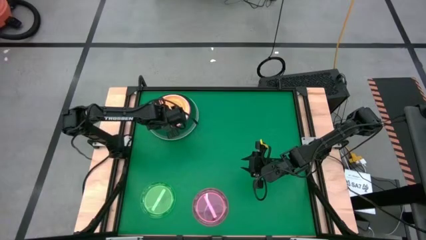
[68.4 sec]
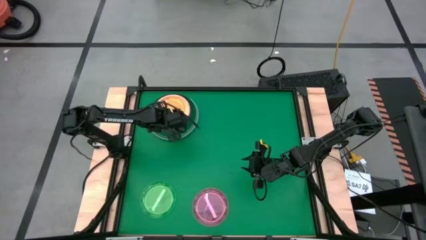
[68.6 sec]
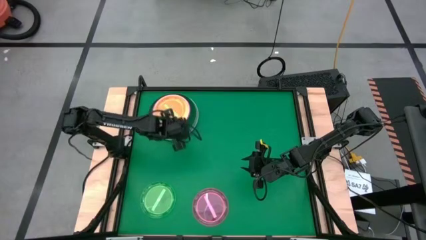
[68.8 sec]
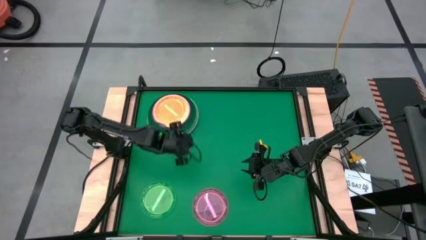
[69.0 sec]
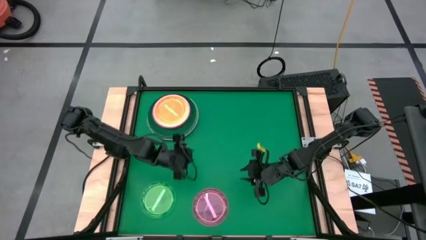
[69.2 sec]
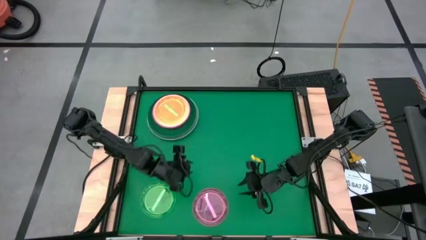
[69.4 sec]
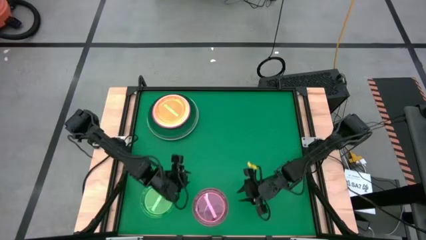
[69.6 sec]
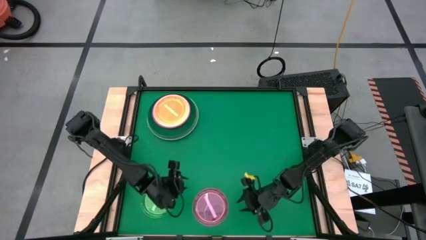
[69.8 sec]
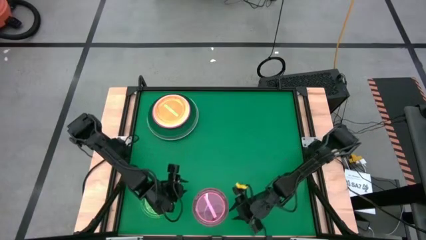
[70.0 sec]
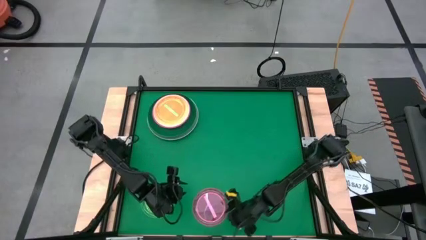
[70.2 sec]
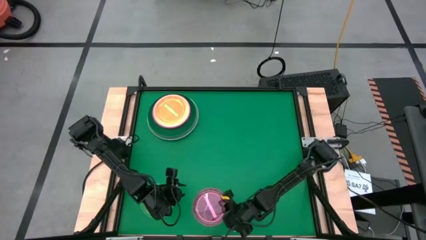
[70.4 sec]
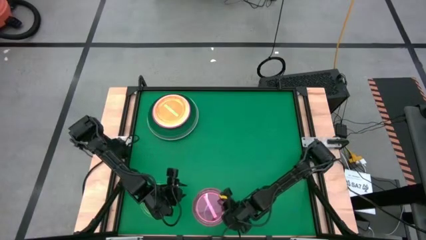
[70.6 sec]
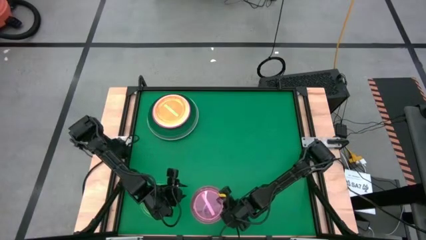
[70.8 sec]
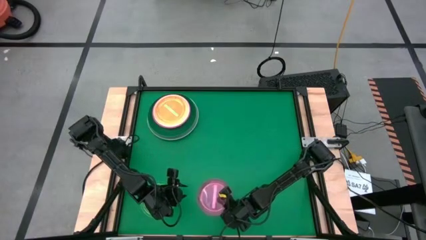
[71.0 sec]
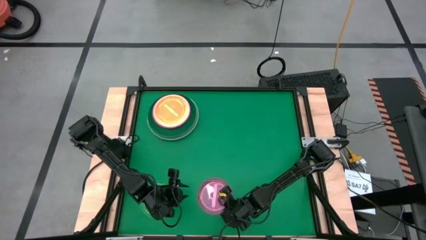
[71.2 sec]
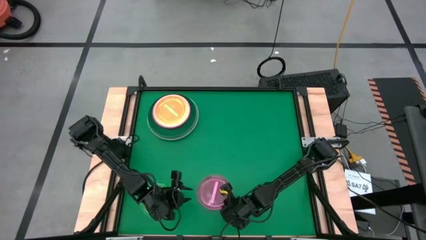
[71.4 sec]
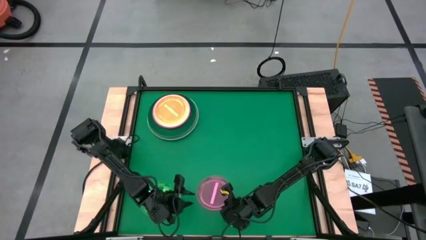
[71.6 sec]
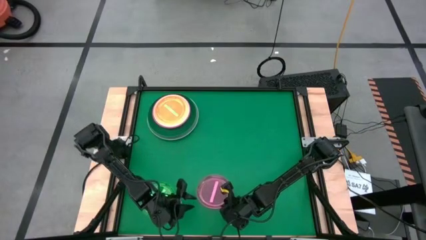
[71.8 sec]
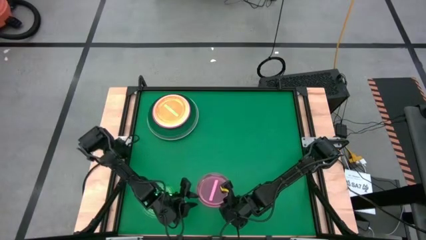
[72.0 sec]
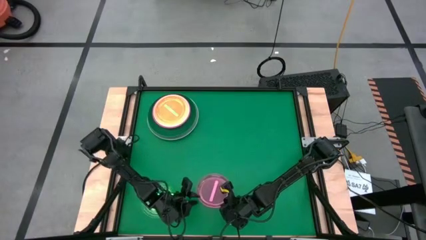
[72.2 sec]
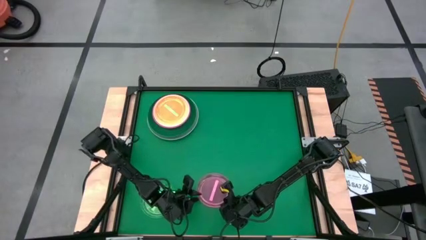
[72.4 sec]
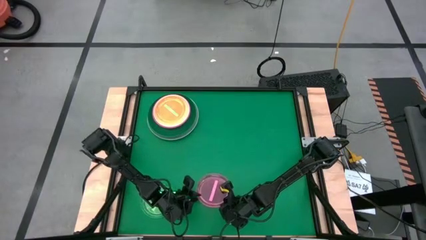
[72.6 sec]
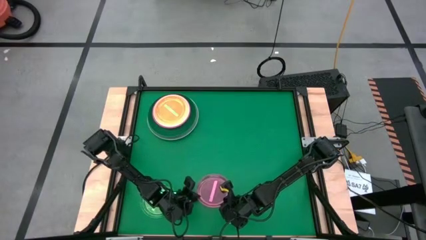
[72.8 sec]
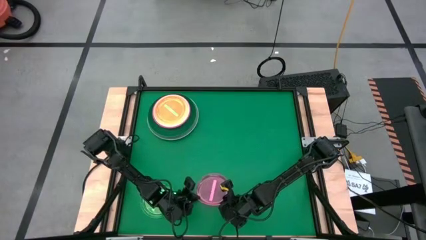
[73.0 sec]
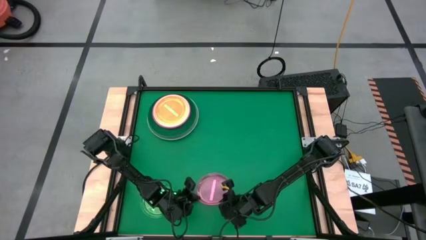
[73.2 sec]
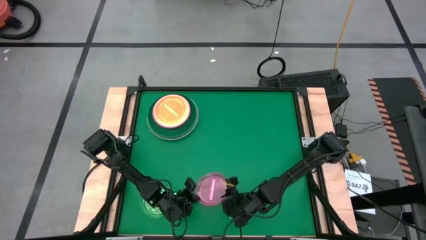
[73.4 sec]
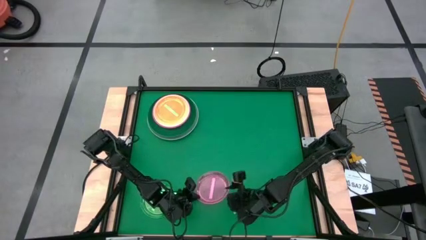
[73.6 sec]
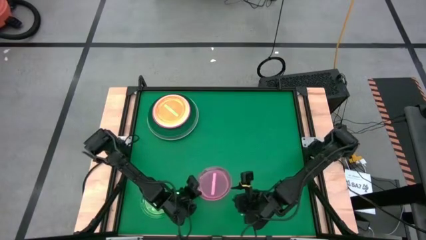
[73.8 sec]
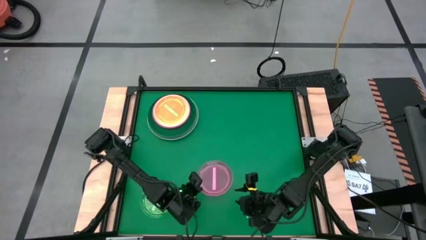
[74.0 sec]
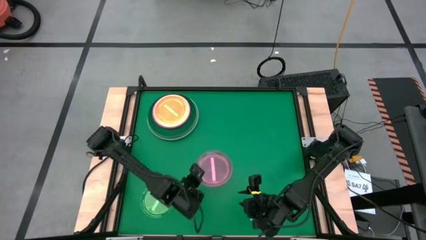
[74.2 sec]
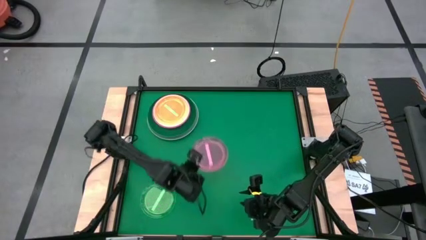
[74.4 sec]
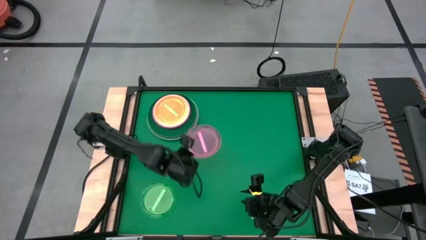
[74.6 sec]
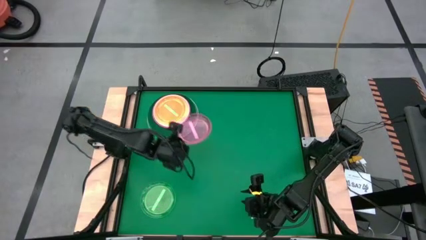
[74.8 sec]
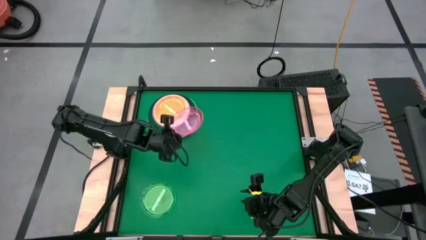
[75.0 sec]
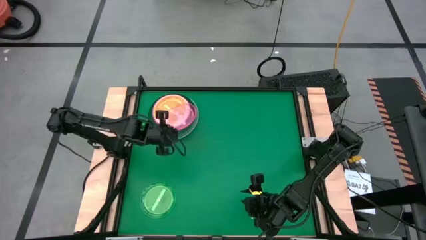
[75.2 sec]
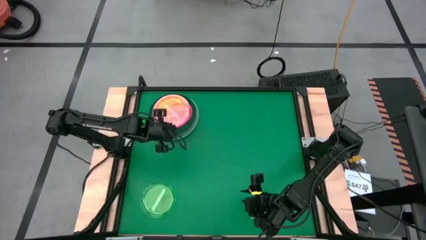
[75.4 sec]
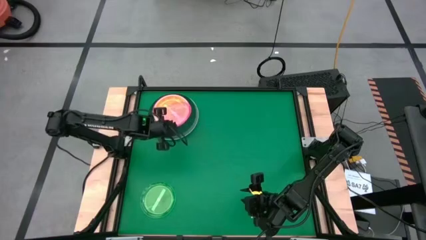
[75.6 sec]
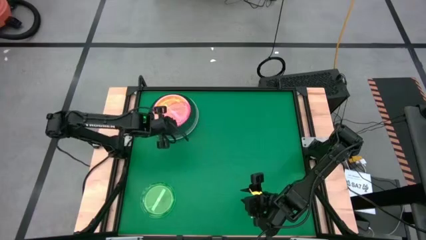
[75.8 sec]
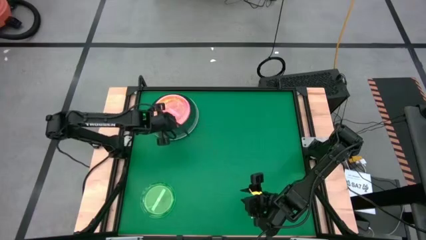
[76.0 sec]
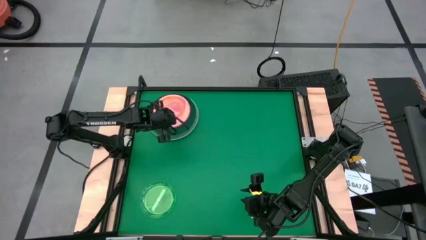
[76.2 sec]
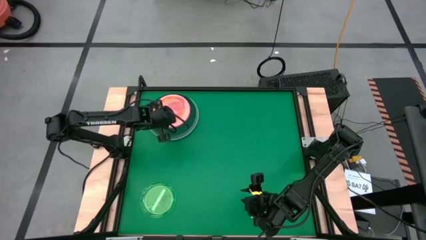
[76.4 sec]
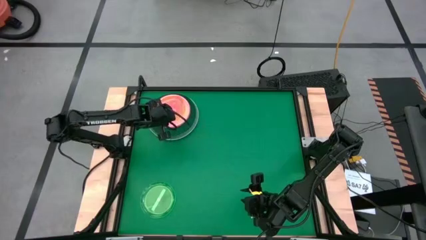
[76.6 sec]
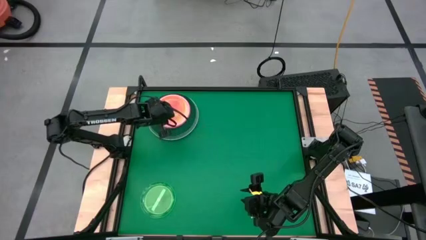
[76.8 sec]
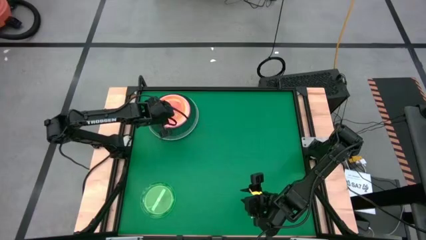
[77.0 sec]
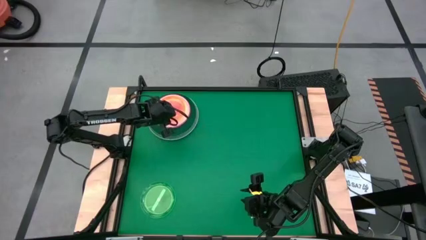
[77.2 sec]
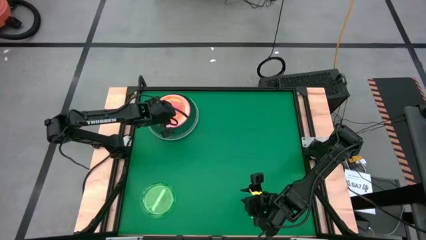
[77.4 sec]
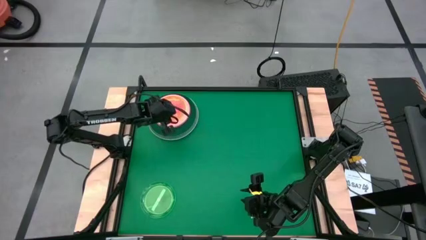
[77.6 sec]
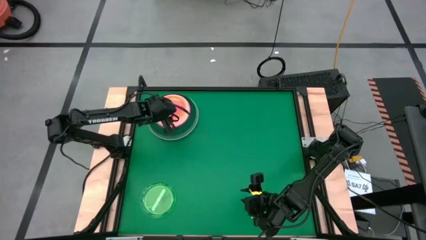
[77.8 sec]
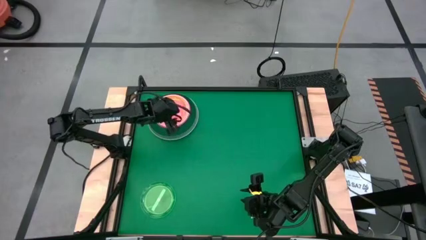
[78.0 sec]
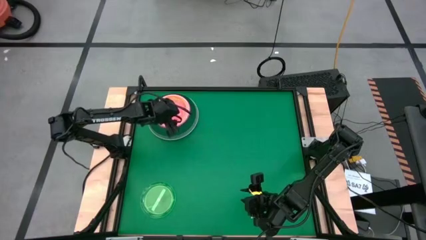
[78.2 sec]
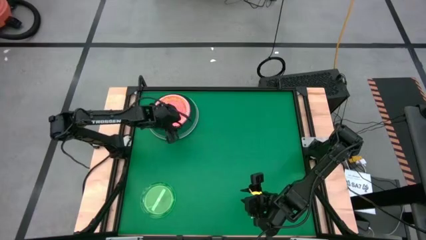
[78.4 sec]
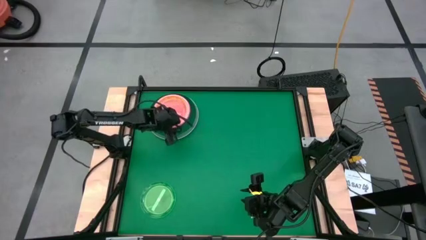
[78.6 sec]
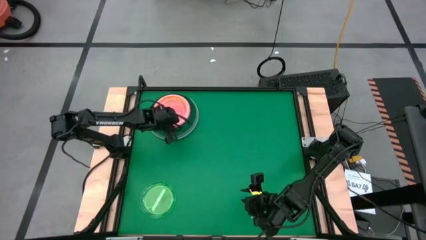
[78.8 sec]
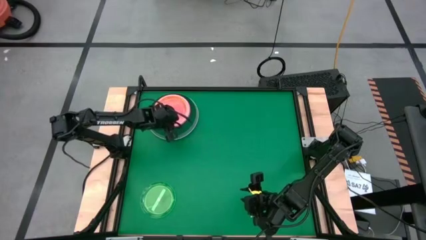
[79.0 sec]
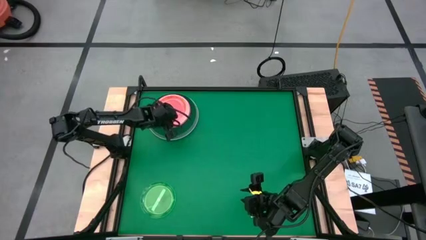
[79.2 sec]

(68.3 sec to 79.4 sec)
Task: Stack plastic plates
Stack the pink transparent plate on the green transparent plate

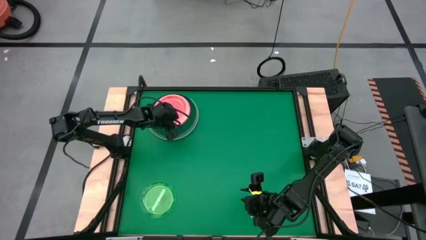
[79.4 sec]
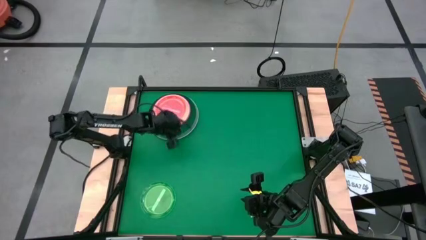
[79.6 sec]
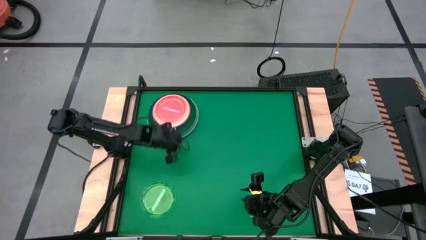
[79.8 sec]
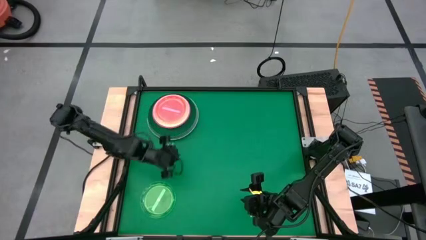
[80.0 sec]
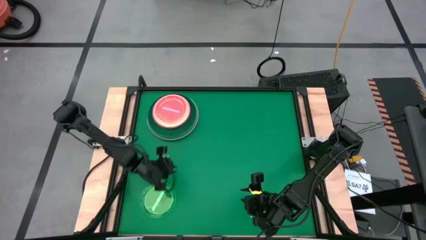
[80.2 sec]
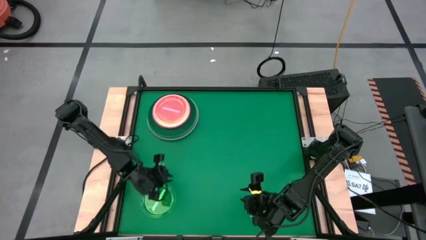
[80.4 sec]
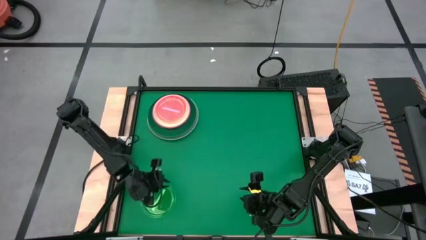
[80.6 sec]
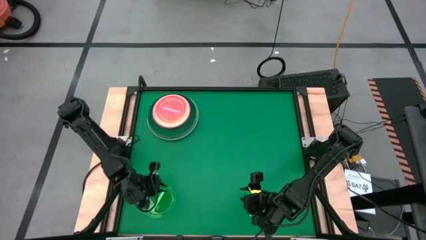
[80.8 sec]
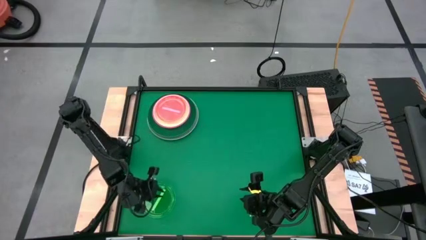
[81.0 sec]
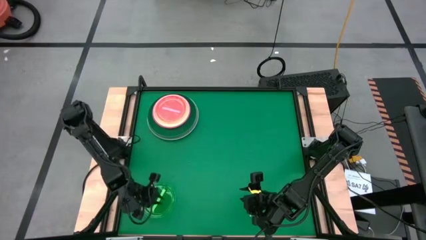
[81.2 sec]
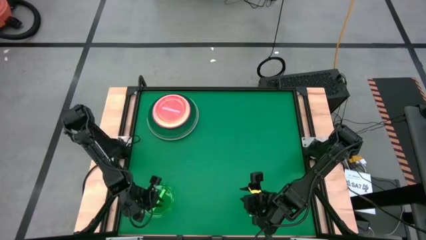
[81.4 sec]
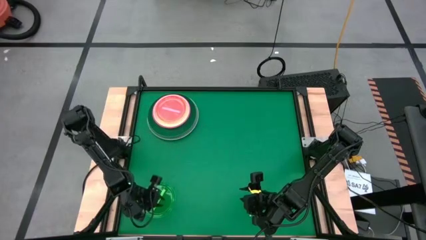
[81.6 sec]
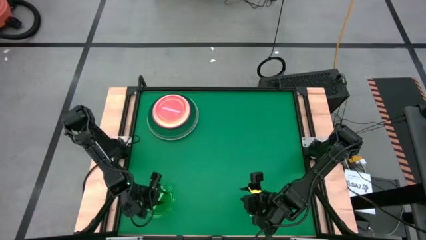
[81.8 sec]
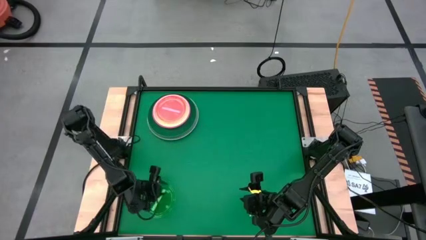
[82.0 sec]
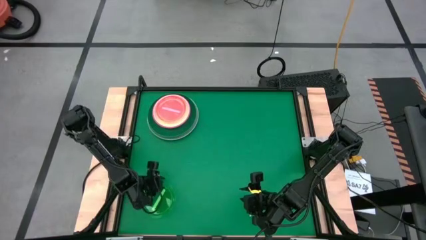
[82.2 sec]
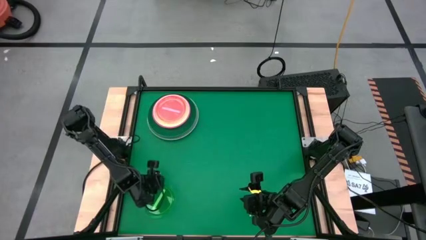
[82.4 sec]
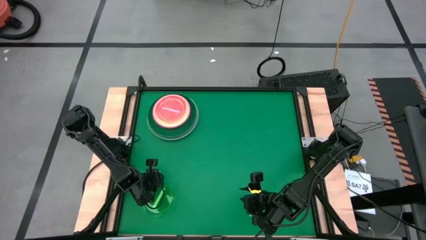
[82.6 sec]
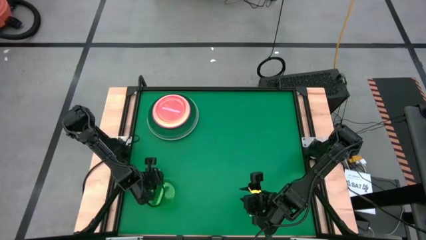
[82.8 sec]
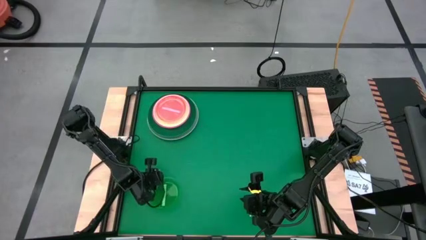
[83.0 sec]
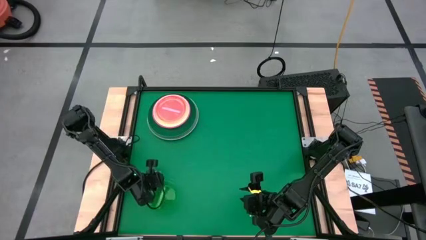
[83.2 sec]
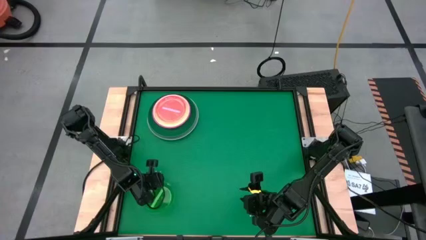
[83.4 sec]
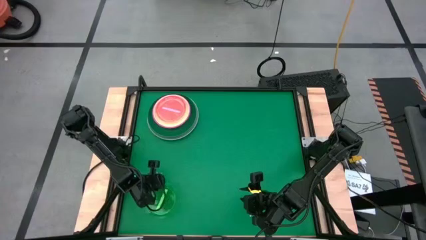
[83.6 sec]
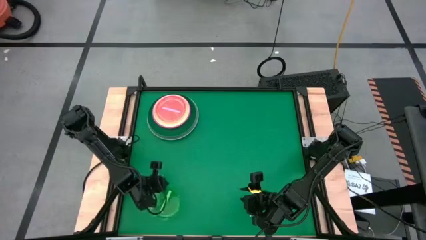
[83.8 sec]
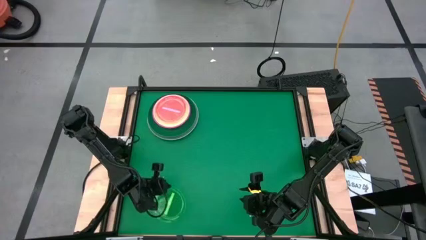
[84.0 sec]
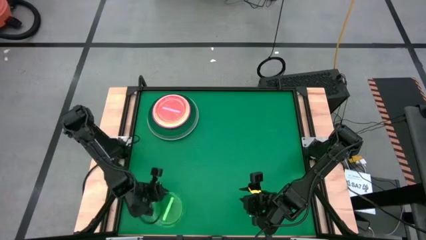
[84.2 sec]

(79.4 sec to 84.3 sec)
Stack the green transparent plate on the pink transparent plate
